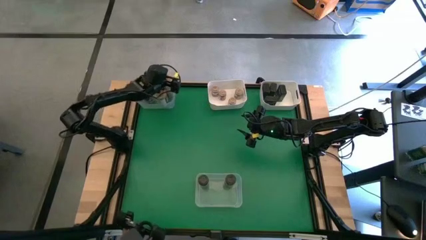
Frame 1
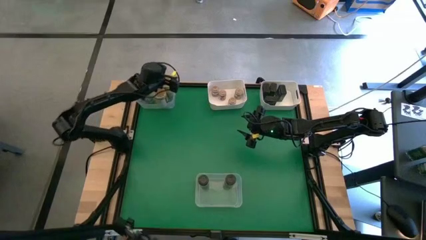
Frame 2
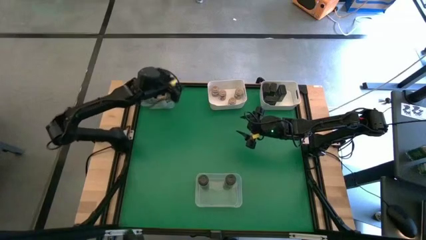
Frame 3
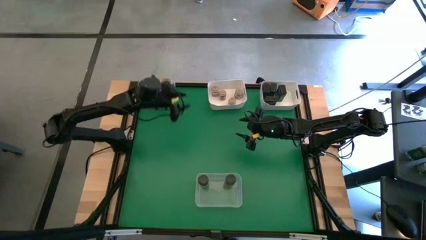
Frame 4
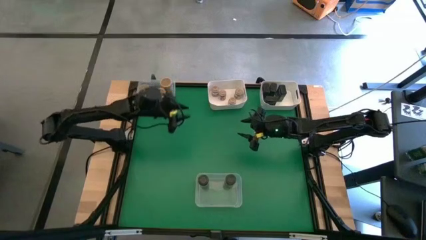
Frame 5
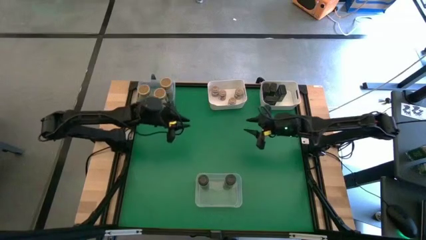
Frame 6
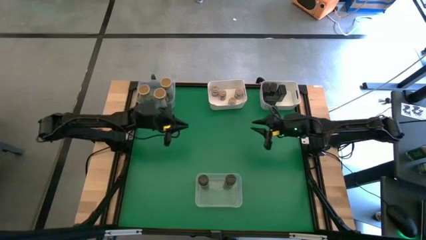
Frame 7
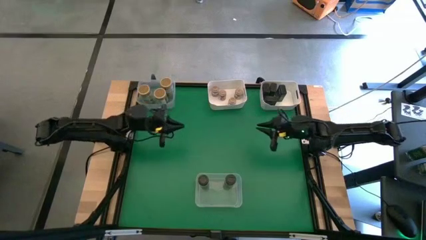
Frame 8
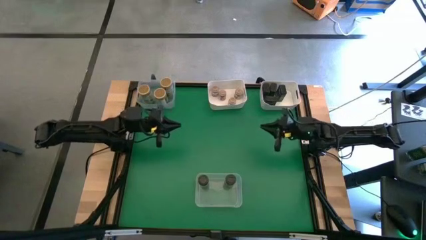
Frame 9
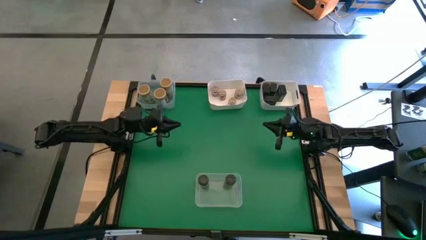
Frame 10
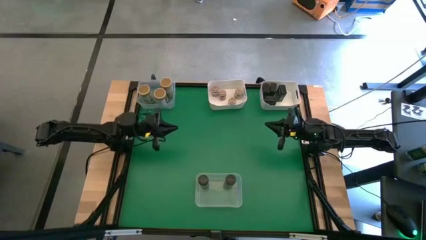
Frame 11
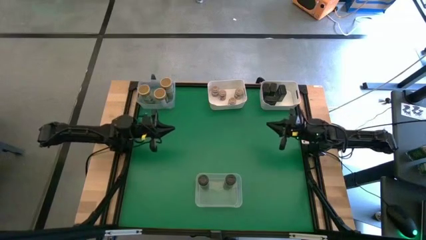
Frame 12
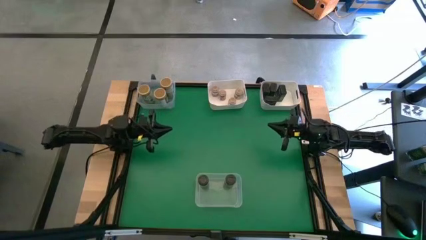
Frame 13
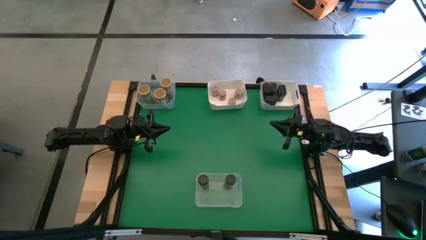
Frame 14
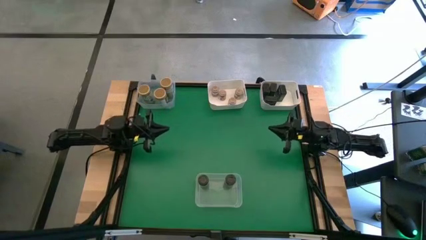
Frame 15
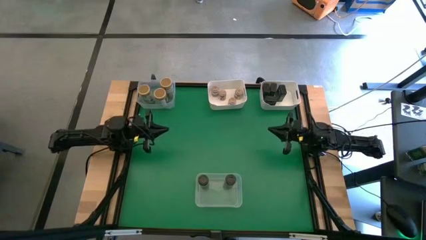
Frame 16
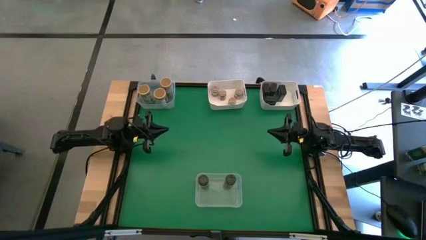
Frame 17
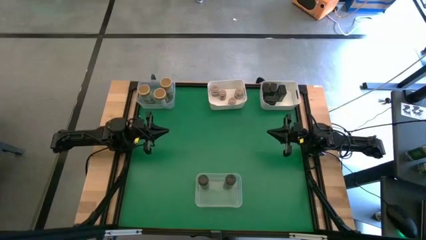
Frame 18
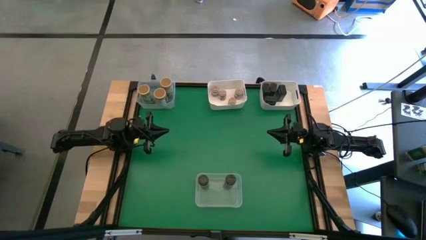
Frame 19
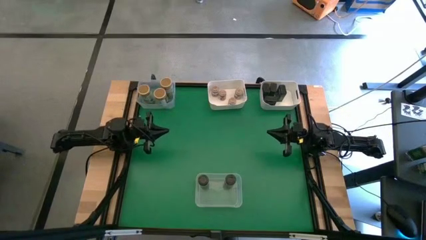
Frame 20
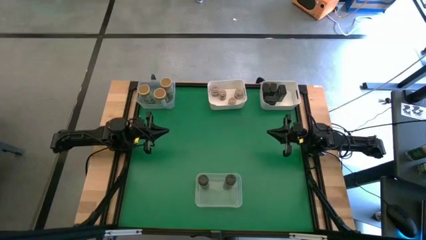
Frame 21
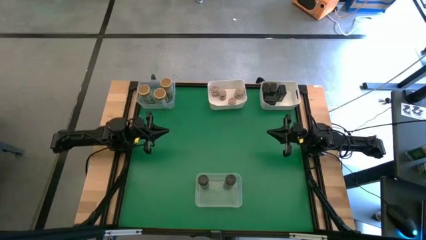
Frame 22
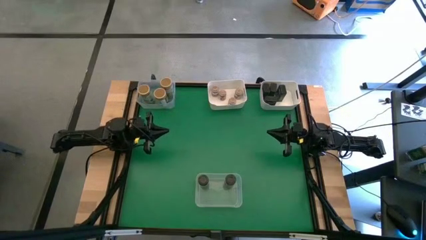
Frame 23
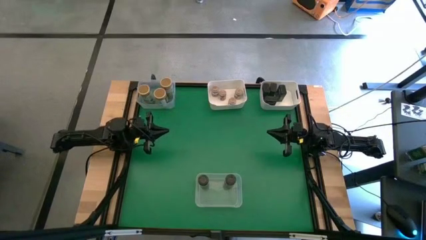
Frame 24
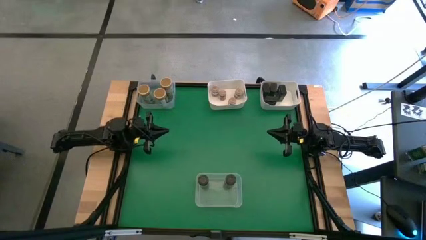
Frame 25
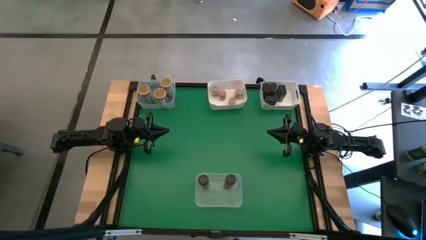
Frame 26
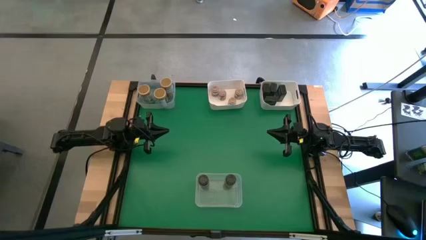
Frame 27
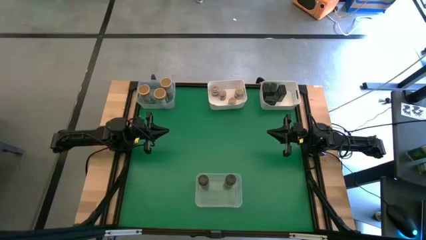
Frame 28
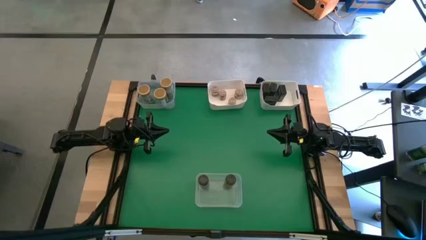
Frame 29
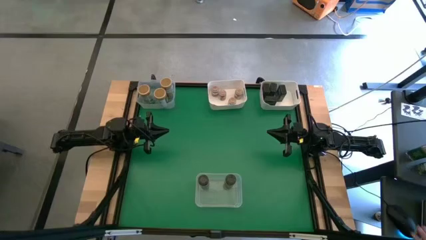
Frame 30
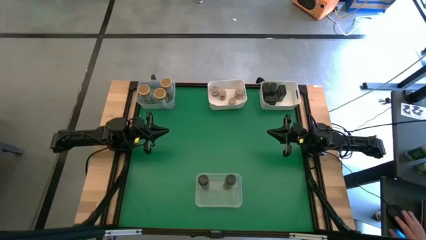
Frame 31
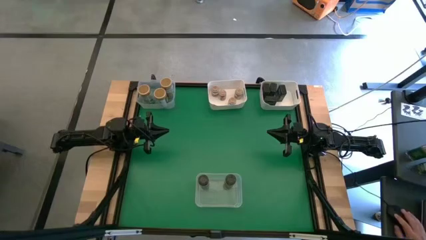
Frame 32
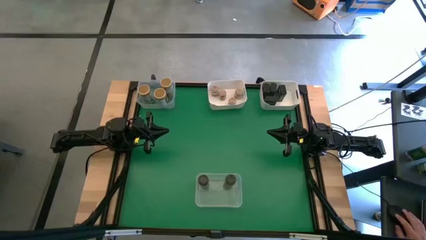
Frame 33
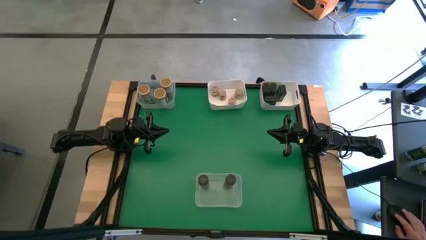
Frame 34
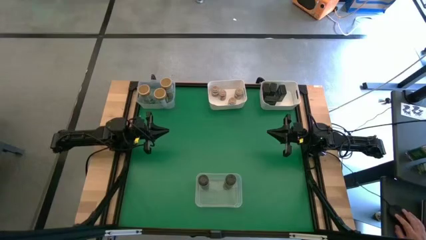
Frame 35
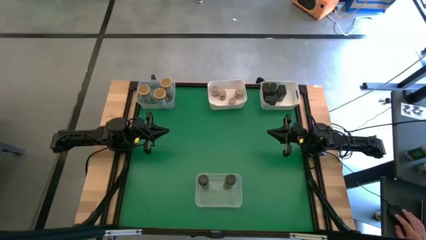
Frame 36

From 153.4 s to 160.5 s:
Task: Sort spices by type
Return to Home Position

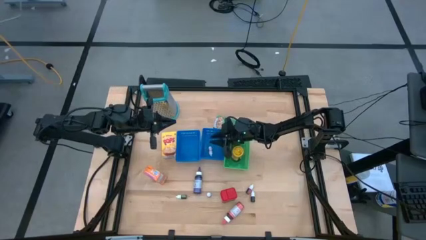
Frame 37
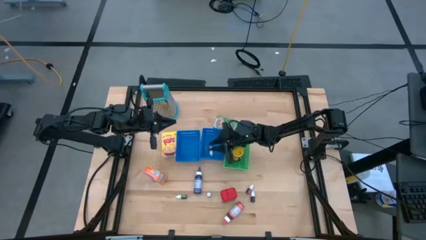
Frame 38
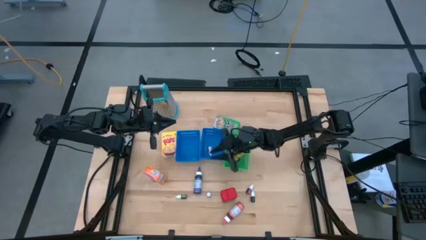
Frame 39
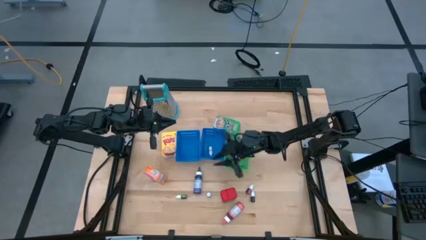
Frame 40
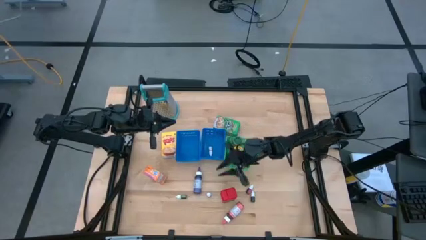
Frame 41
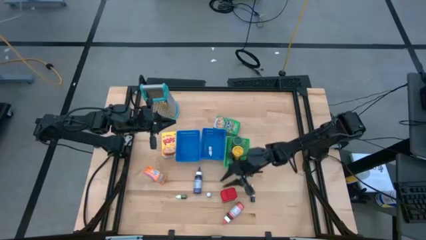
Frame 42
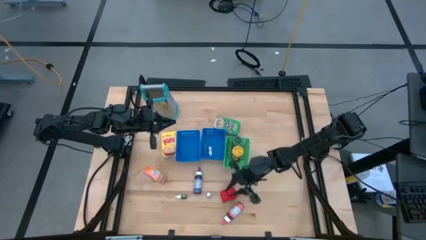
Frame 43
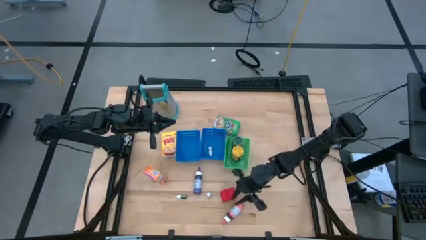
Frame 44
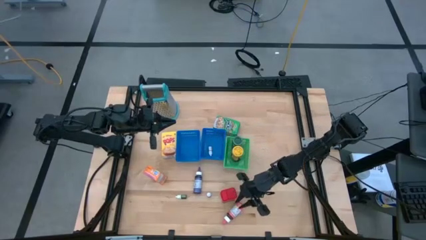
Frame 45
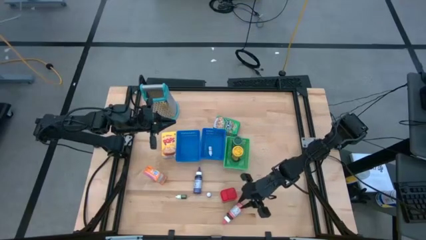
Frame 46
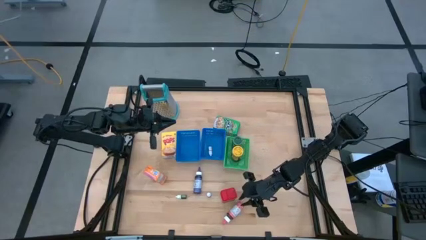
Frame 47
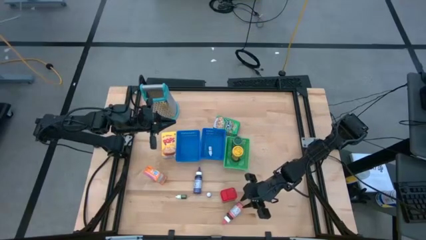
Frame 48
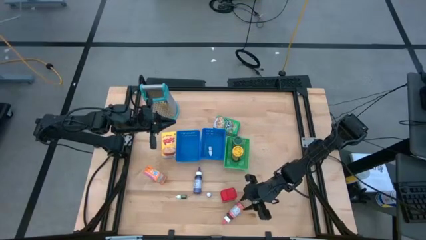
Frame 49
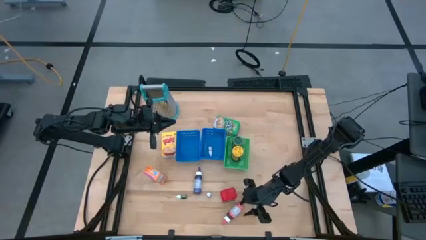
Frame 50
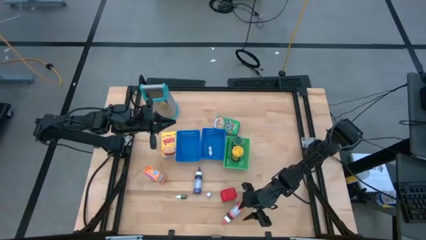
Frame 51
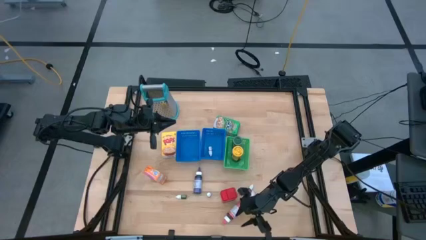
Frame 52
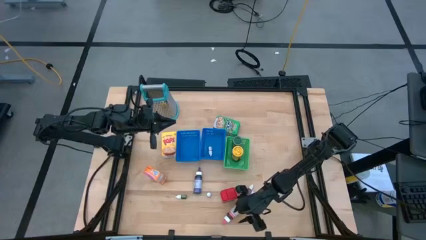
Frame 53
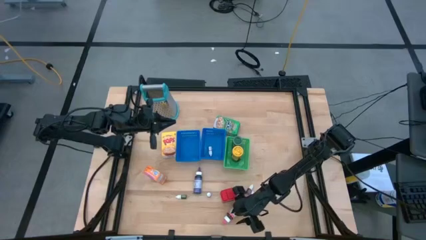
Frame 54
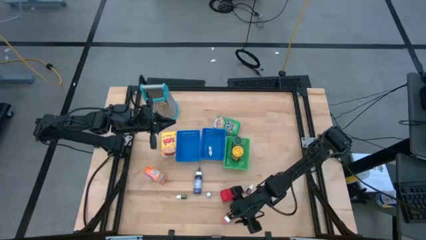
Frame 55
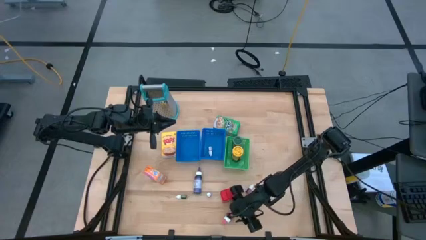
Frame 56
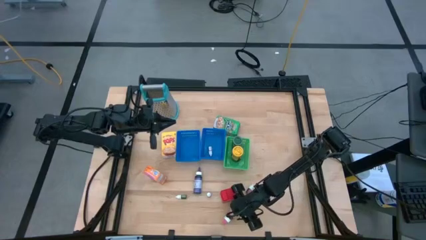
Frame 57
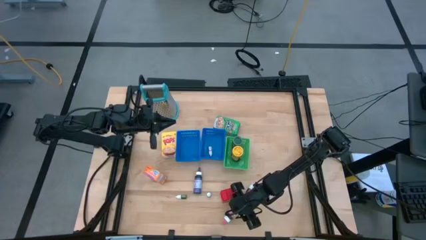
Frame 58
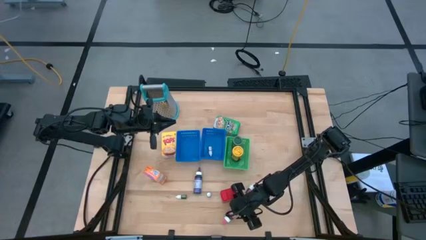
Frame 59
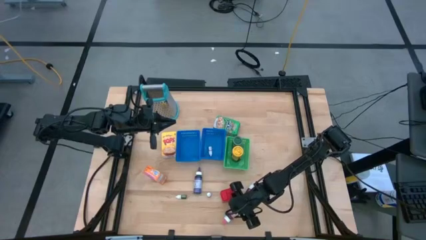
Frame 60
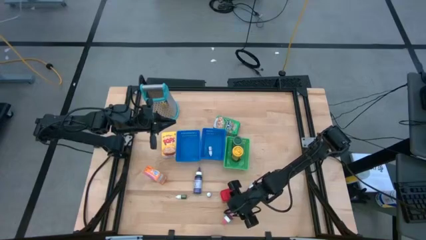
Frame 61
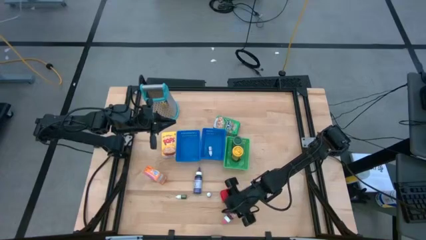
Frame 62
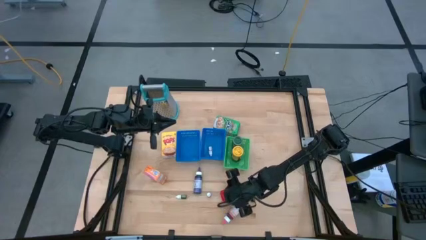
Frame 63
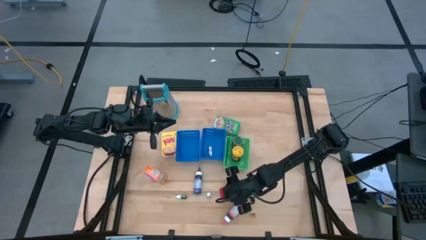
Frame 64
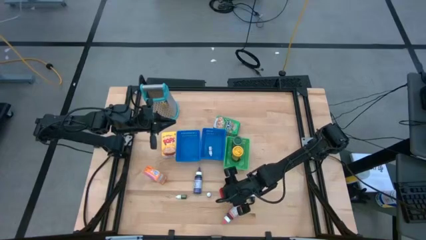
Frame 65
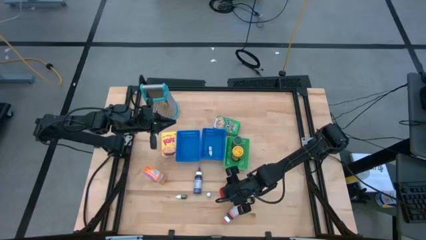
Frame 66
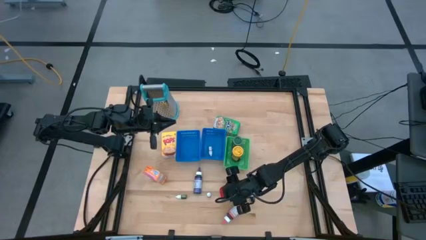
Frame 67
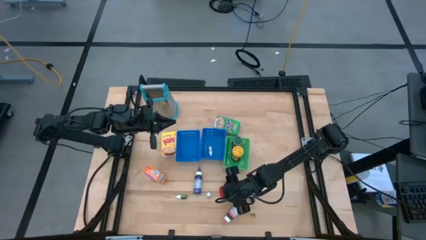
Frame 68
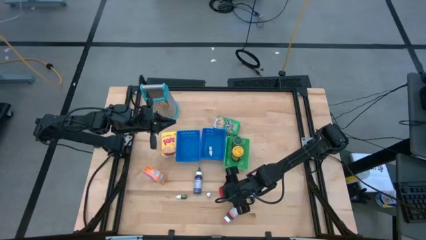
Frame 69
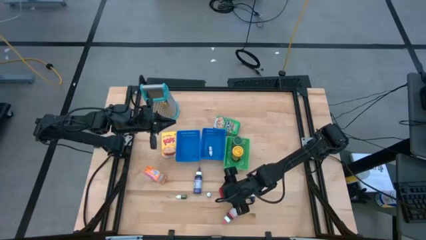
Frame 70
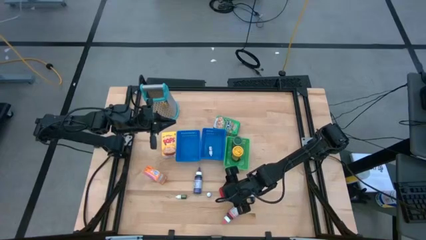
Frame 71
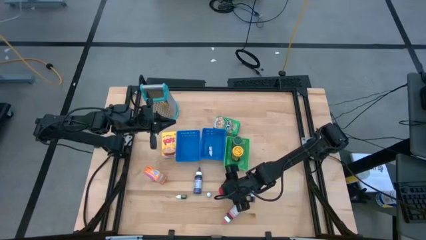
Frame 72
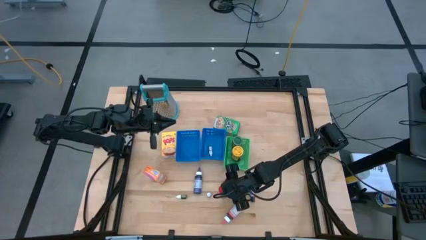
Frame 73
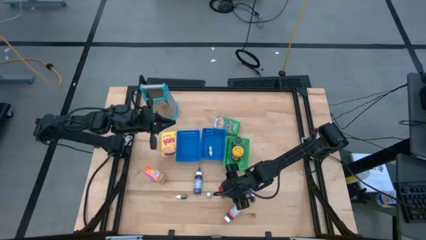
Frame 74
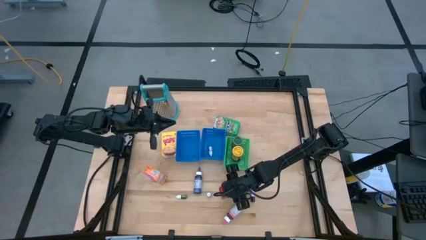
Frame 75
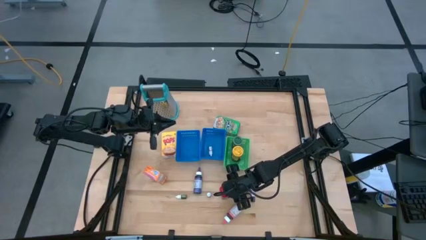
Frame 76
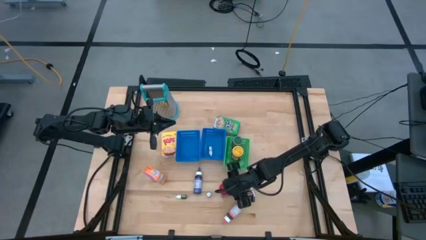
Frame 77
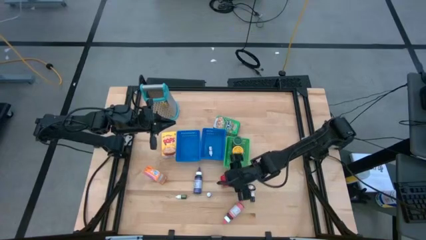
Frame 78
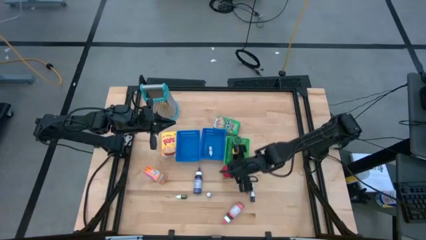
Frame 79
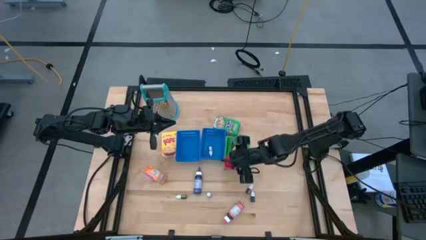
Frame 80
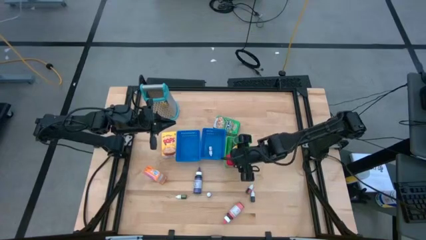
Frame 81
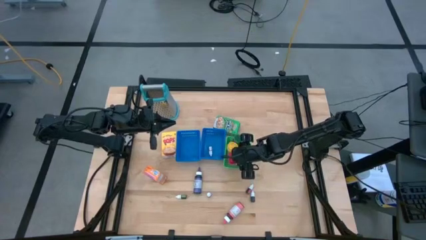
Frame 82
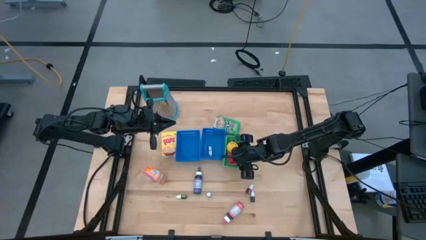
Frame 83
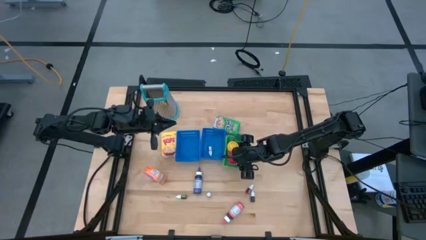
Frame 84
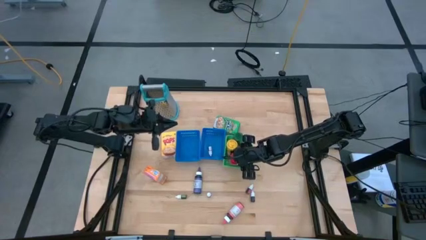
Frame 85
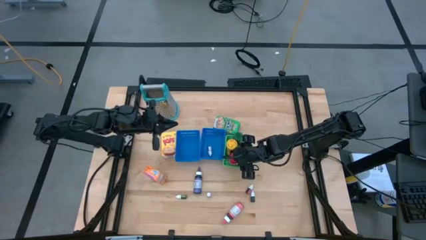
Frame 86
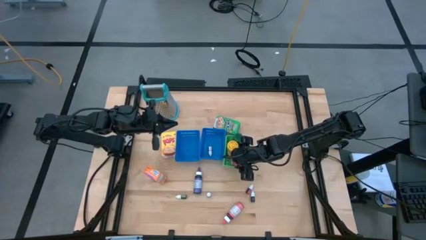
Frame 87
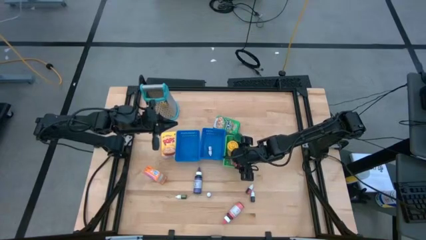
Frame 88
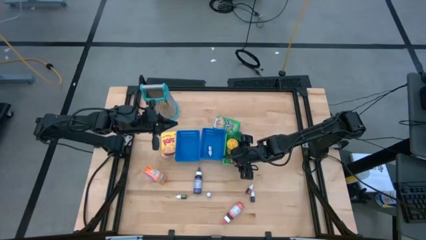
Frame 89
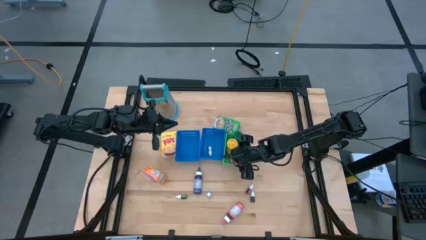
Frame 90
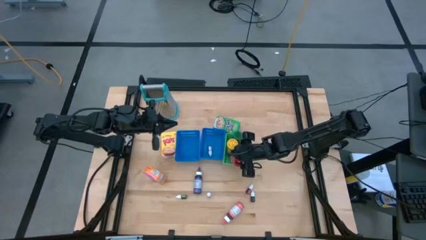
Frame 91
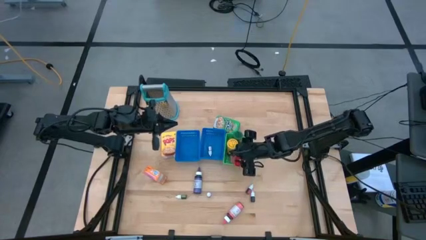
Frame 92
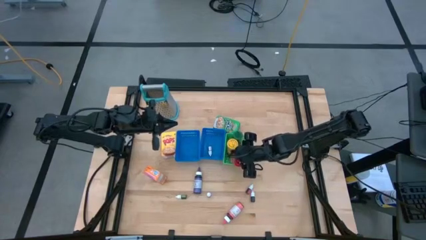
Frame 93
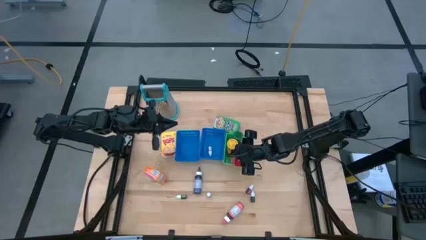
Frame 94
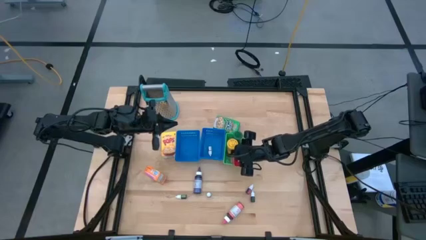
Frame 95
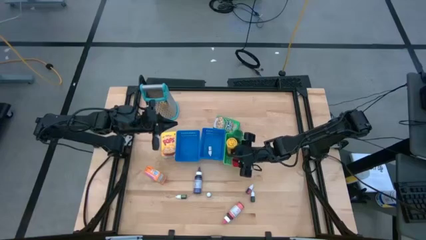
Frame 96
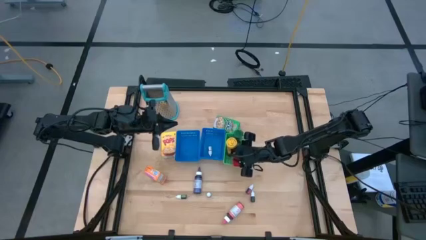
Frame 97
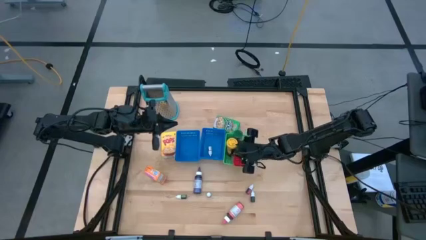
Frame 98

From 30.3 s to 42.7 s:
Task: Pick & Place Kitchen Items
Put the red seasoning can into the green bin
